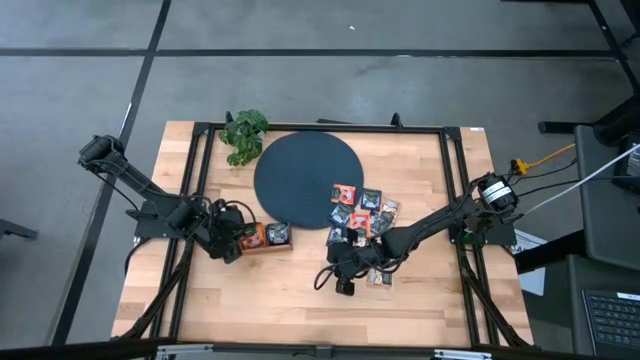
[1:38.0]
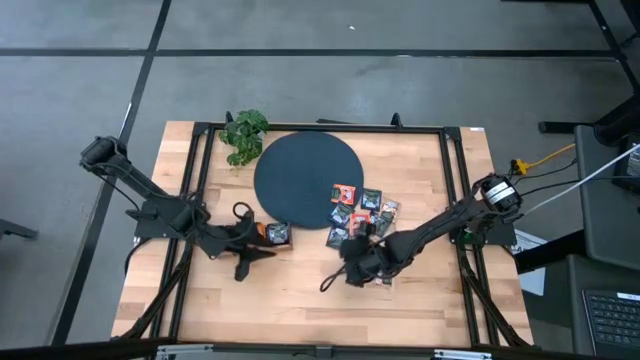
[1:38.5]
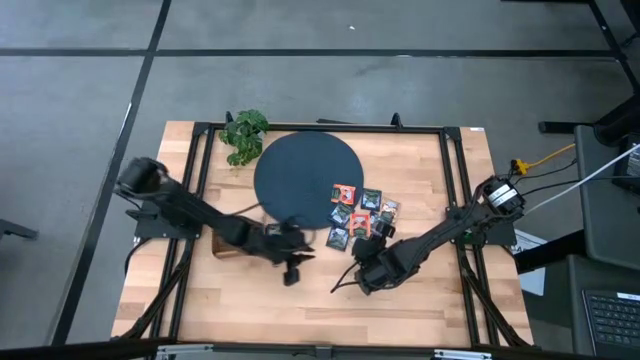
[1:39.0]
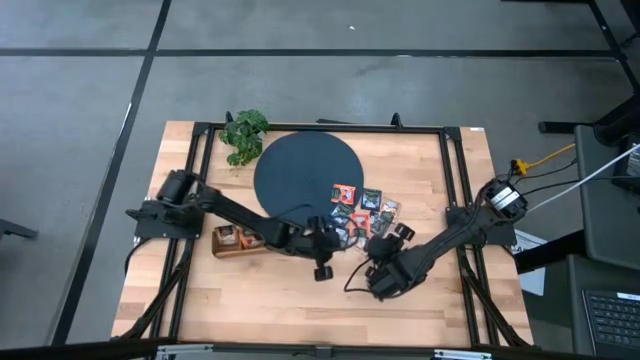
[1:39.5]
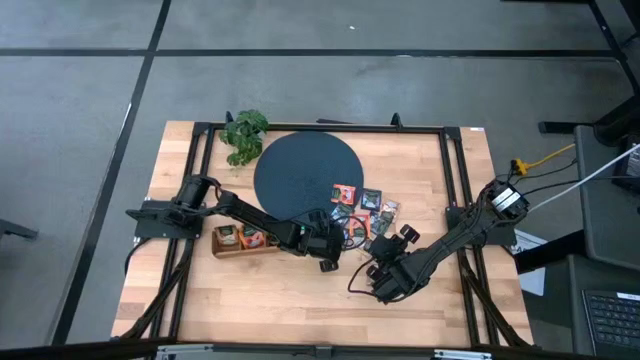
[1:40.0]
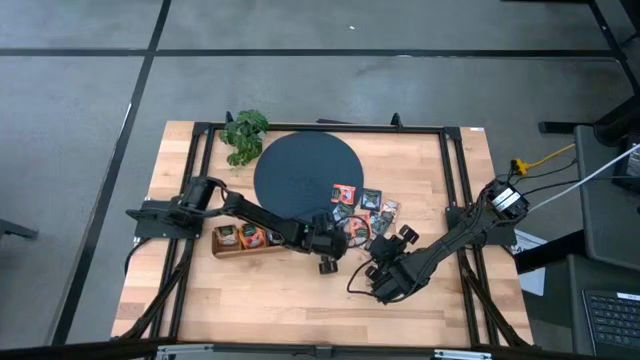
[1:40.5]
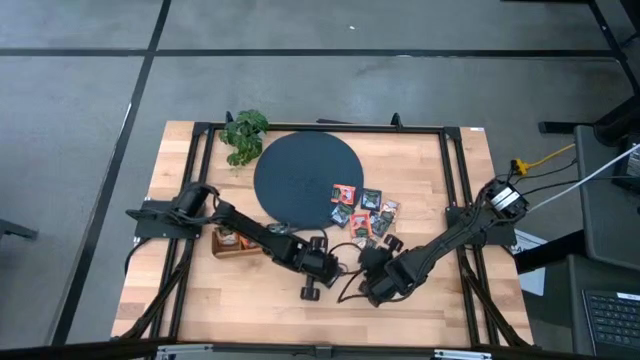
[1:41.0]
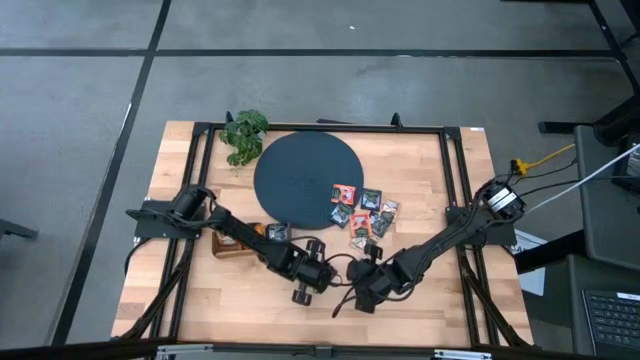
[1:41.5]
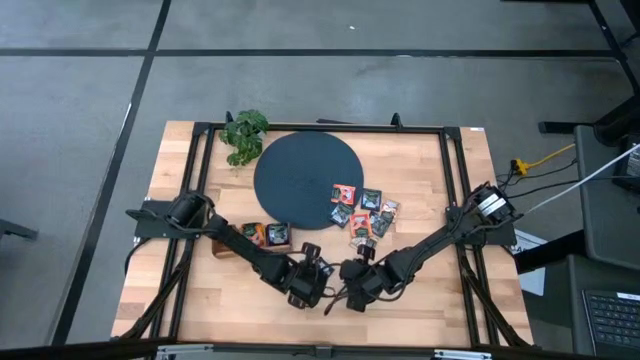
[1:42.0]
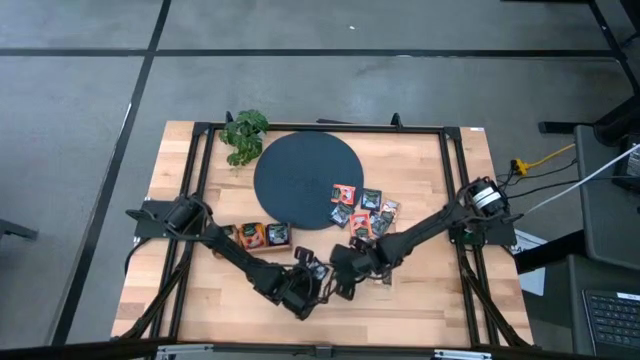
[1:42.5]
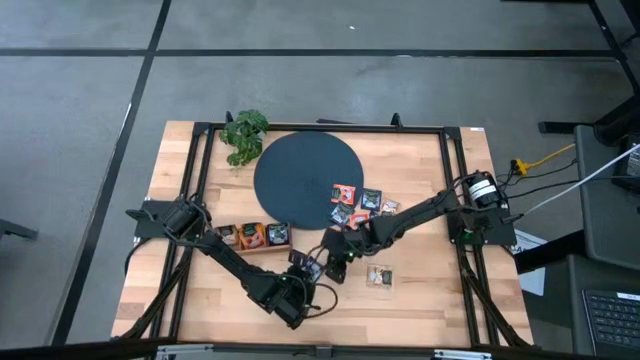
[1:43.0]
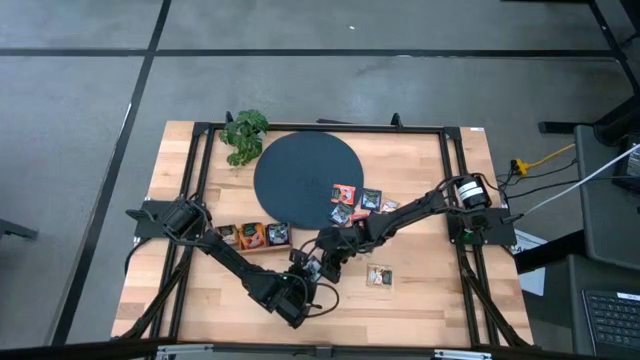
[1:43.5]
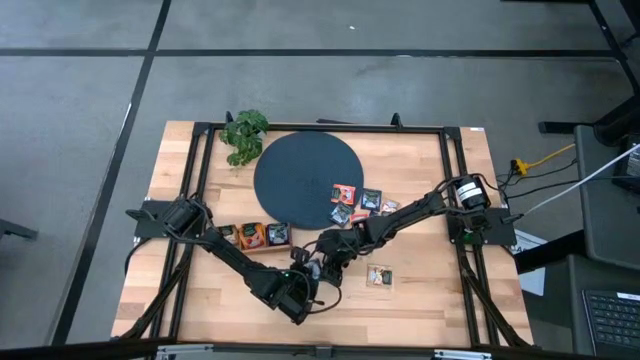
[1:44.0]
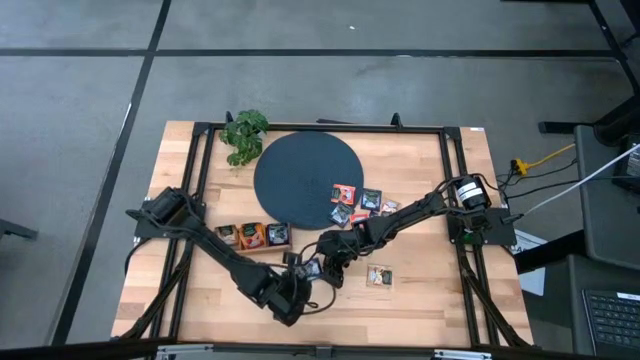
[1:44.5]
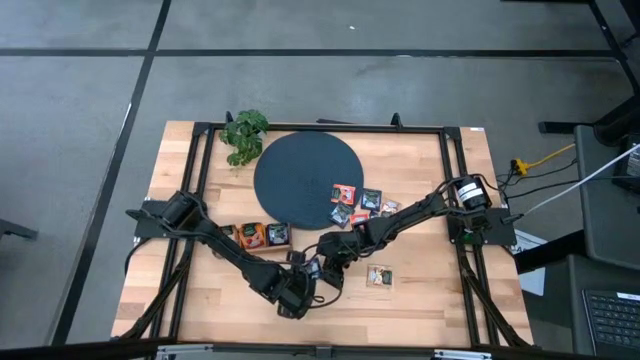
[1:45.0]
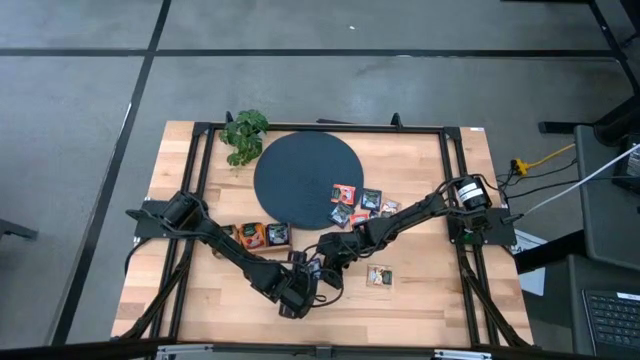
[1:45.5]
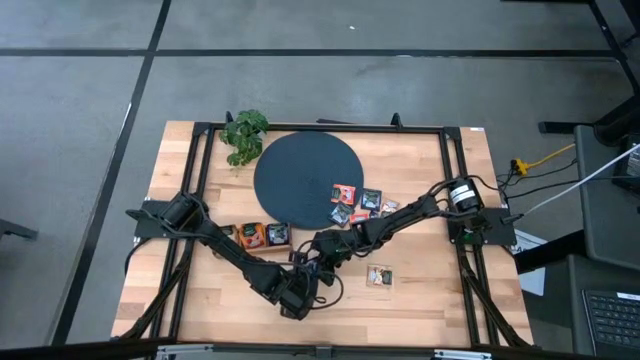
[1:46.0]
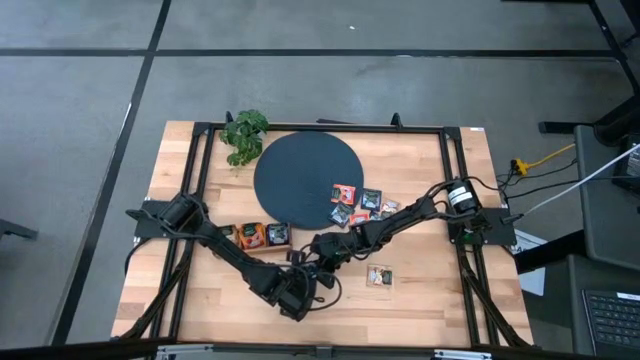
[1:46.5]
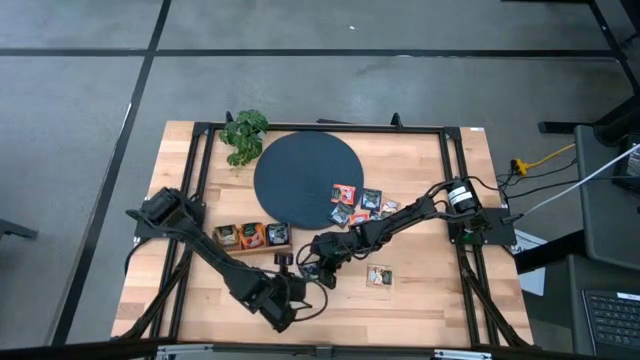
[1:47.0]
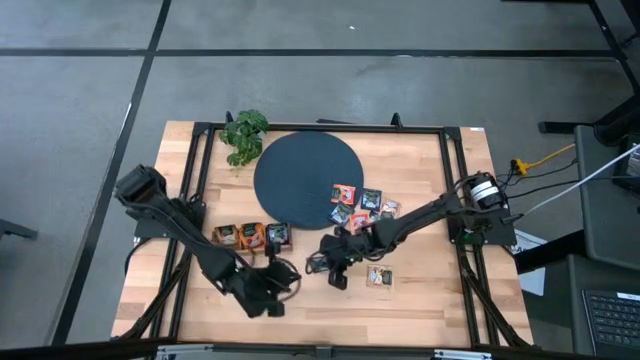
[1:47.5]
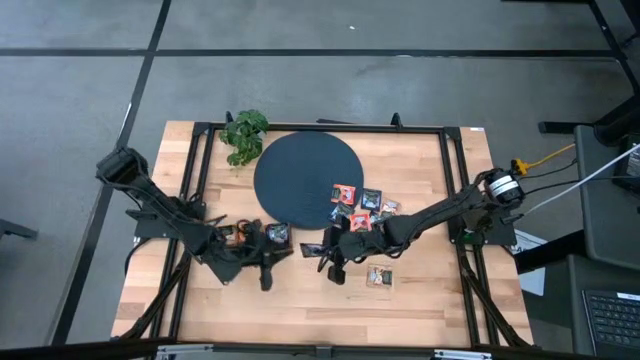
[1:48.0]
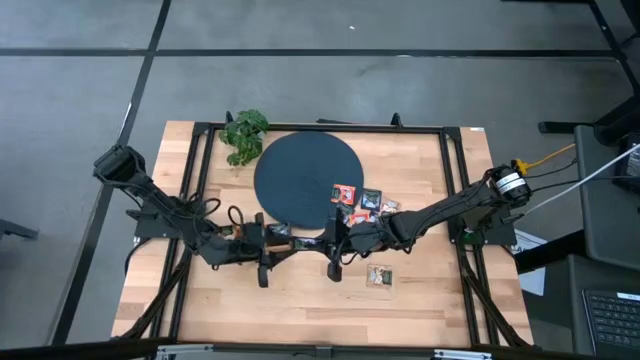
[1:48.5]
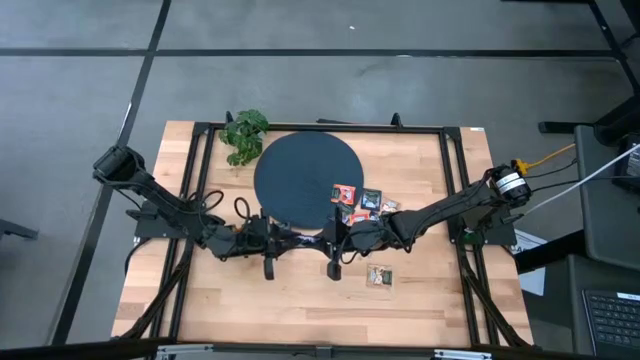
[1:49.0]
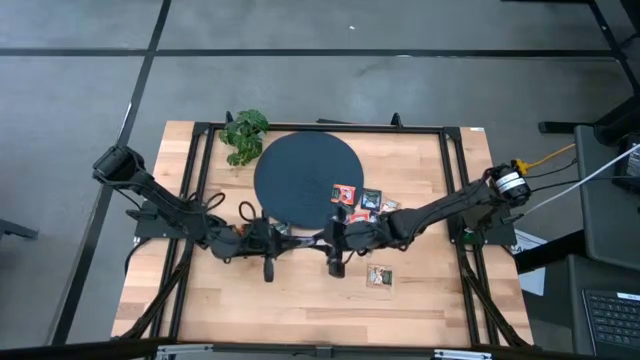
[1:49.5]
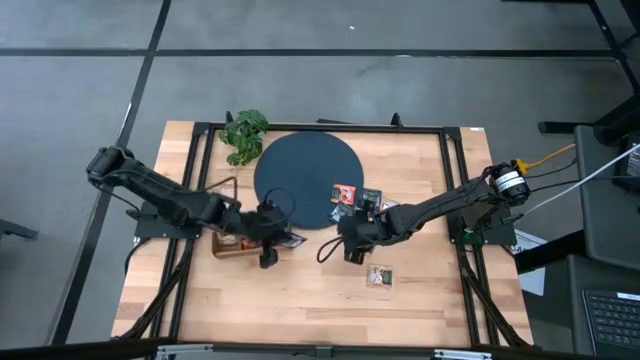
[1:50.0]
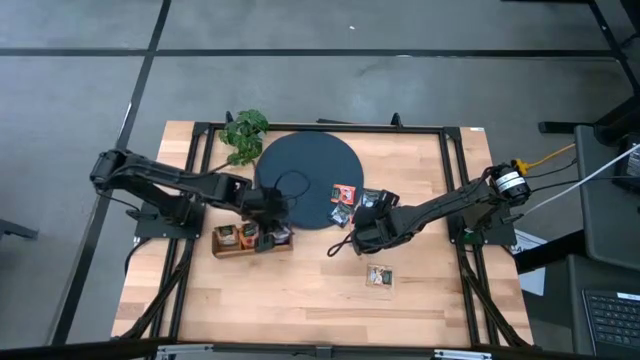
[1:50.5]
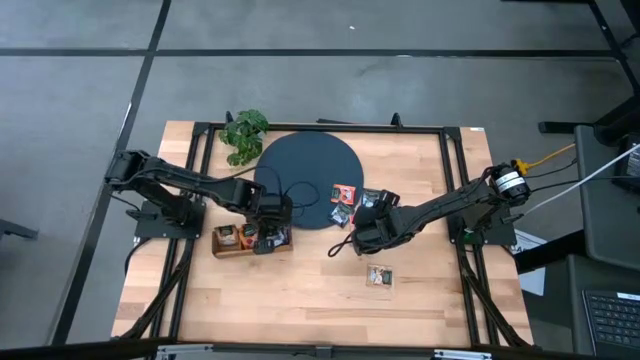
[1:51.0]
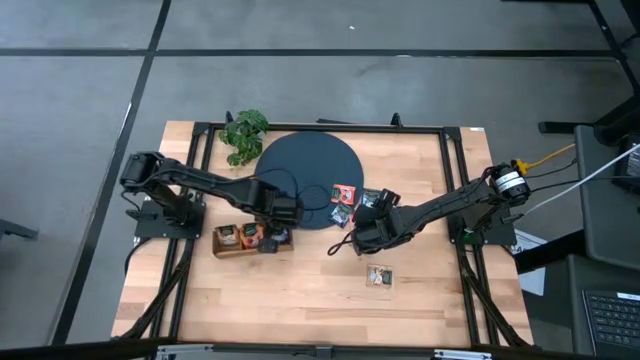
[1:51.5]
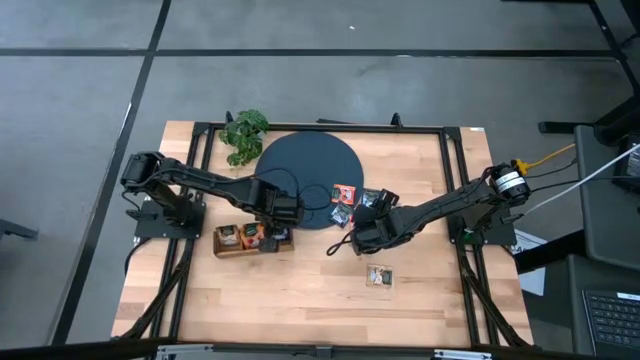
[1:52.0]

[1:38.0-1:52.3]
Task: Pick & Place Tea
Put the purple tea bag into the right section of the wooden organizer

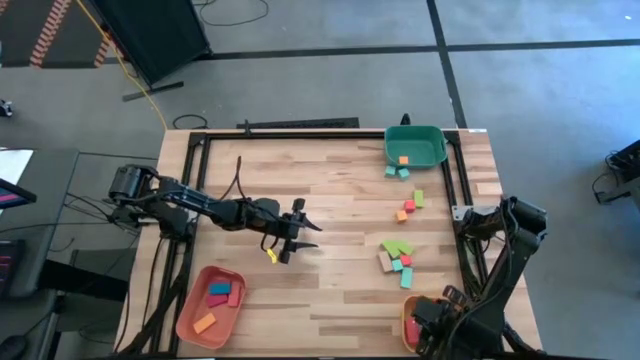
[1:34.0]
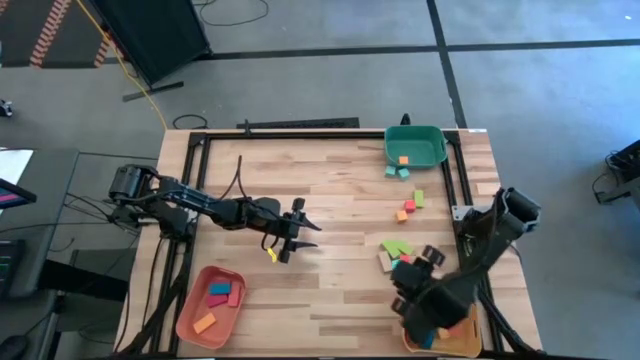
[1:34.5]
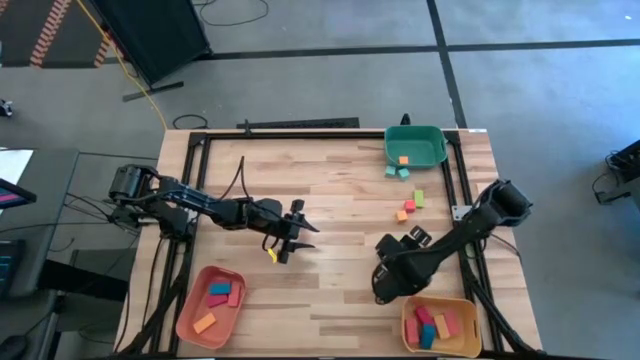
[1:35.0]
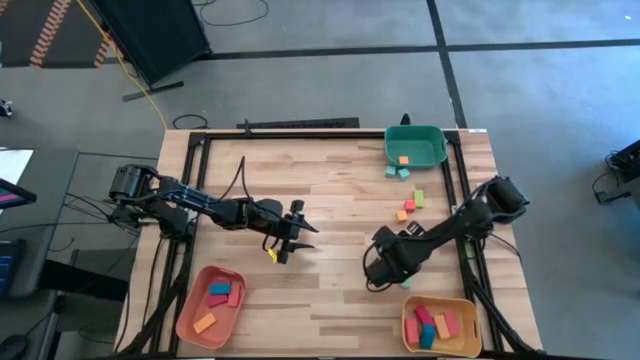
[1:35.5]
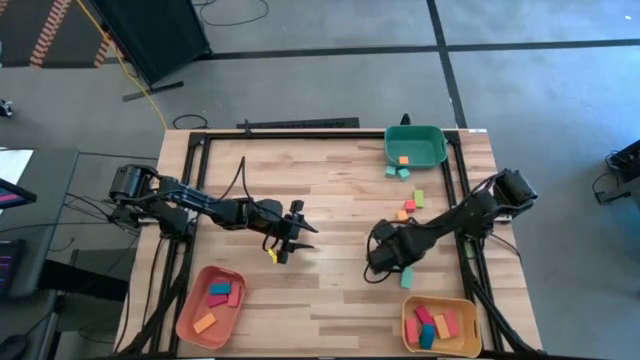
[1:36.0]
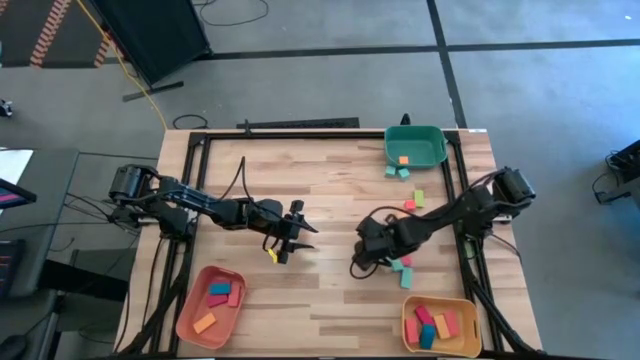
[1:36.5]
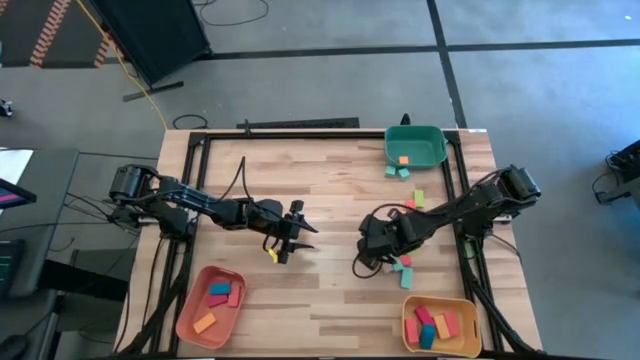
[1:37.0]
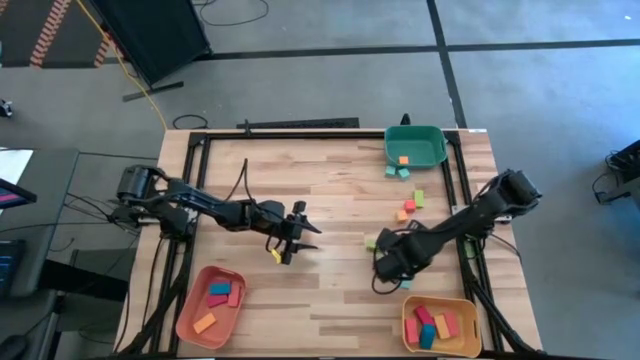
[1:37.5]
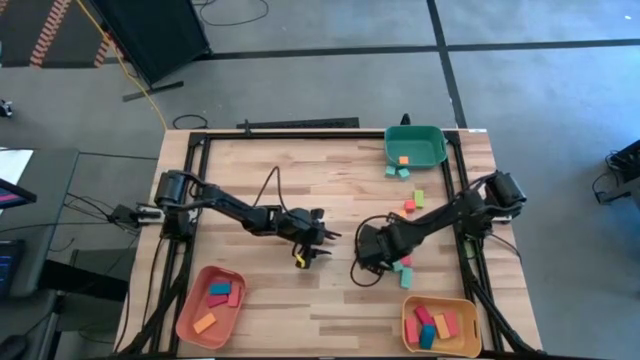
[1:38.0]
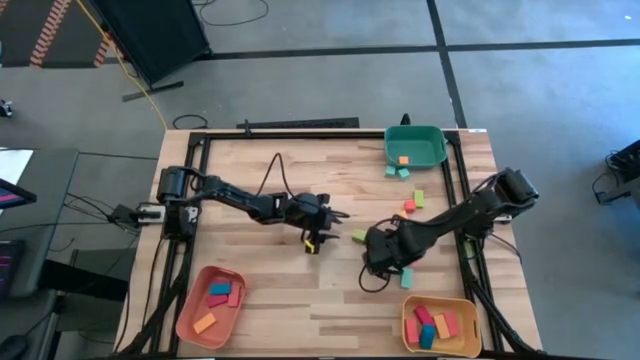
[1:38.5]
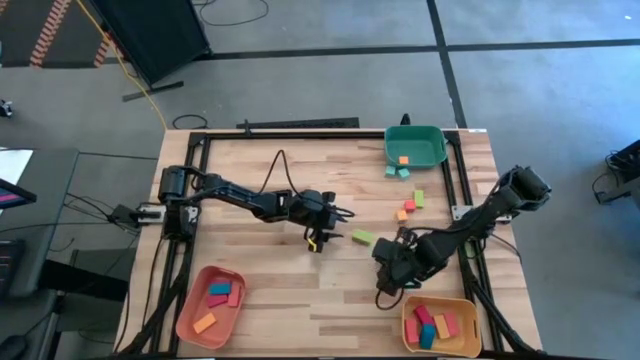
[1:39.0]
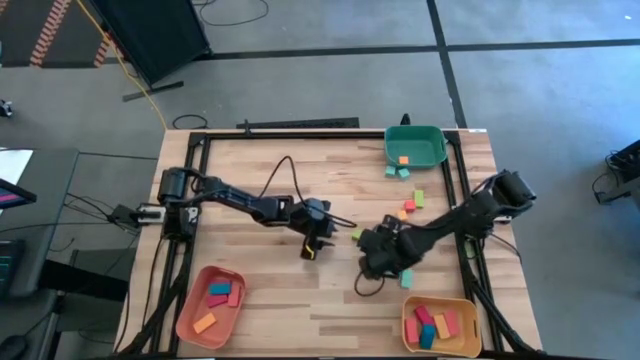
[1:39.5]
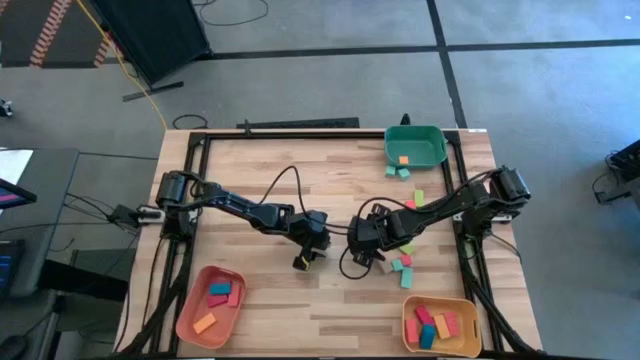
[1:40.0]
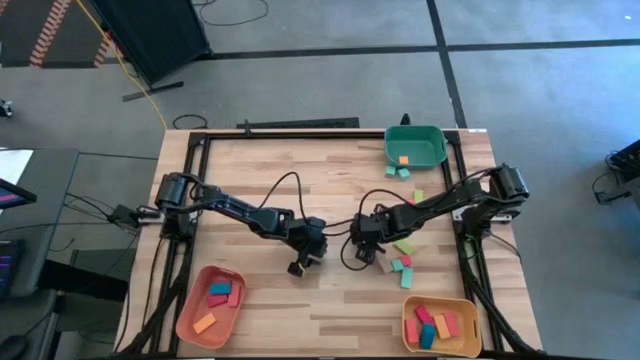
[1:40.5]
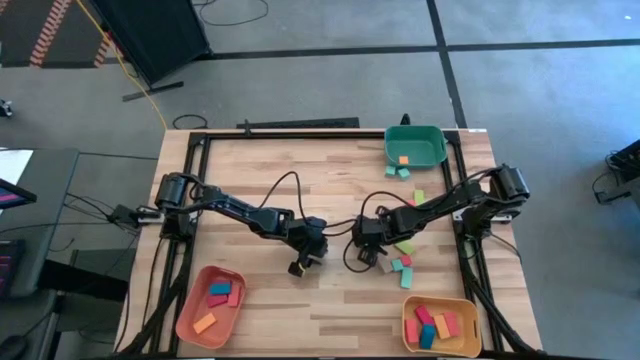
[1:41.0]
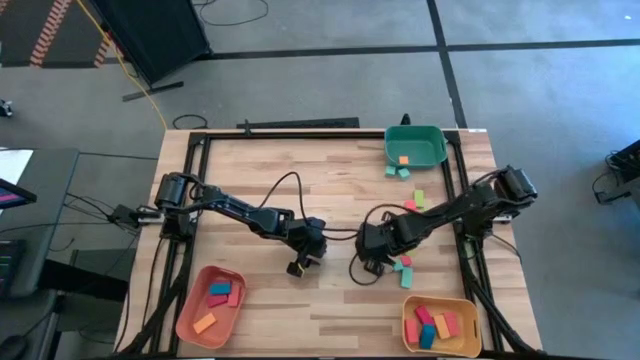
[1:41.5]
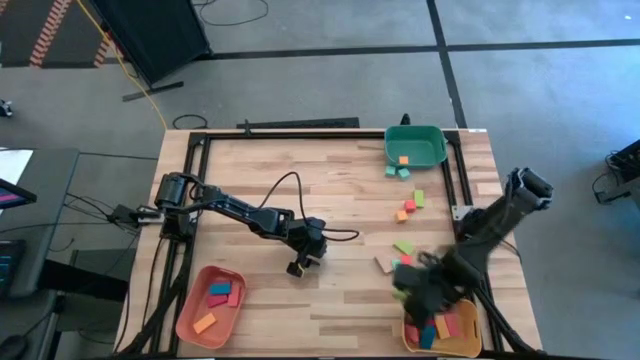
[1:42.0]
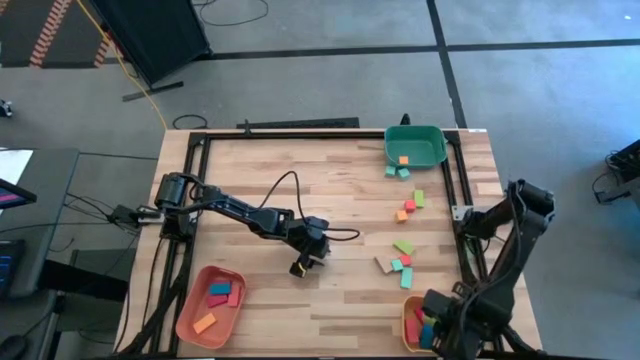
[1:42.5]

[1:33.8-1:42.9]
Task: Sort blocks by size
Put the large green rectangular block into the yellow bin
